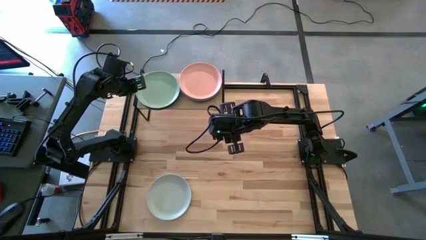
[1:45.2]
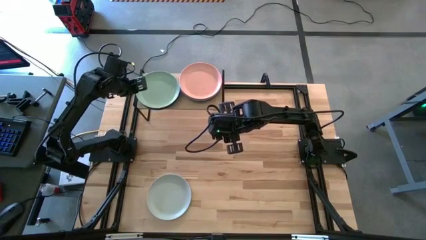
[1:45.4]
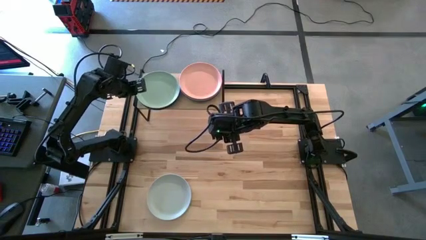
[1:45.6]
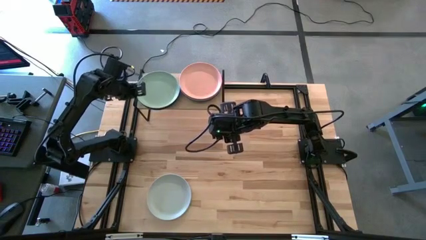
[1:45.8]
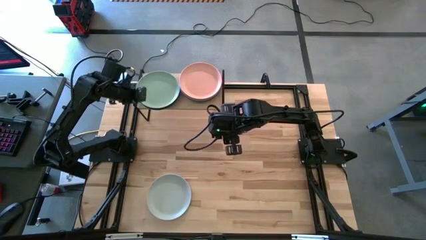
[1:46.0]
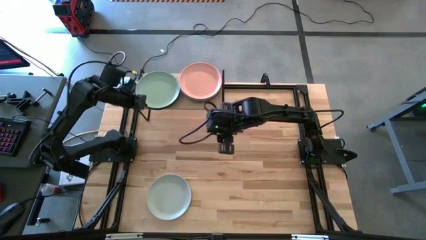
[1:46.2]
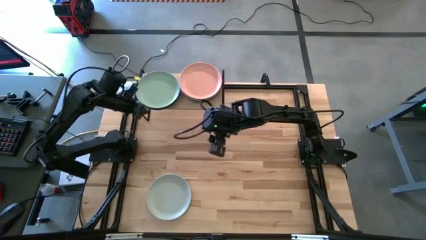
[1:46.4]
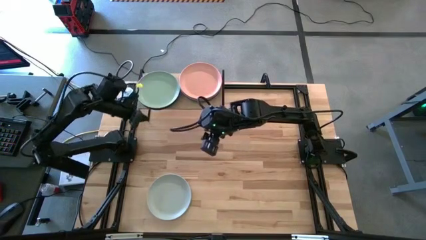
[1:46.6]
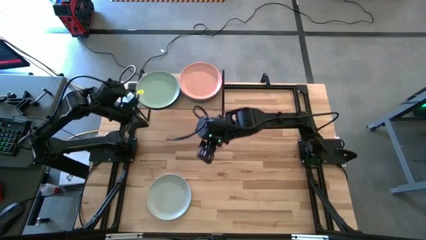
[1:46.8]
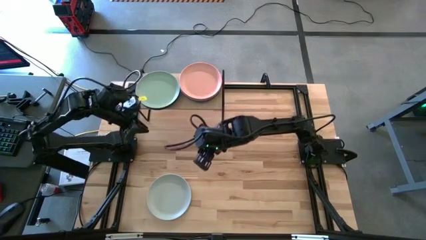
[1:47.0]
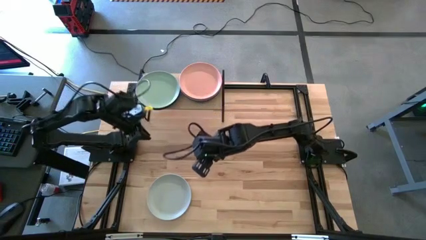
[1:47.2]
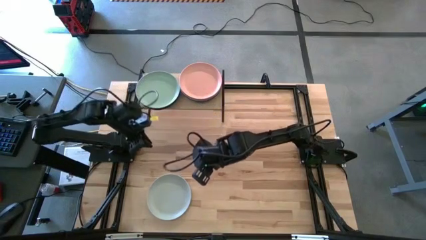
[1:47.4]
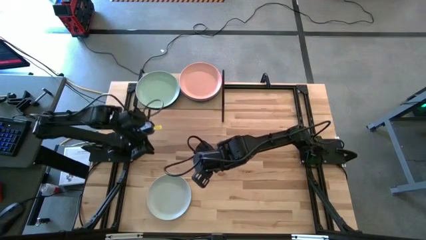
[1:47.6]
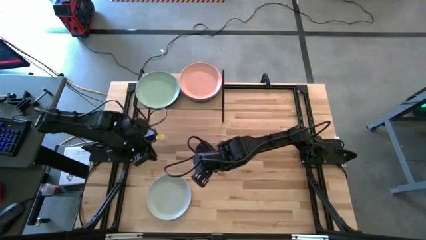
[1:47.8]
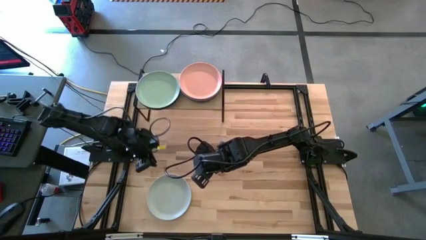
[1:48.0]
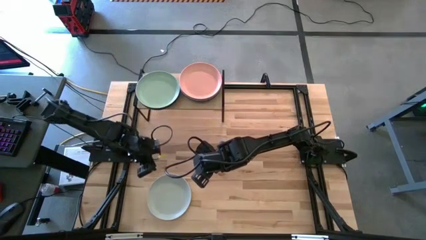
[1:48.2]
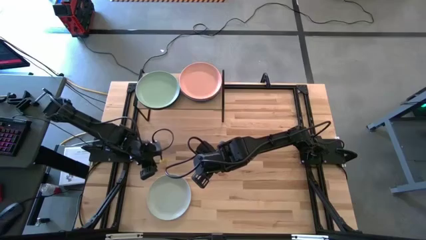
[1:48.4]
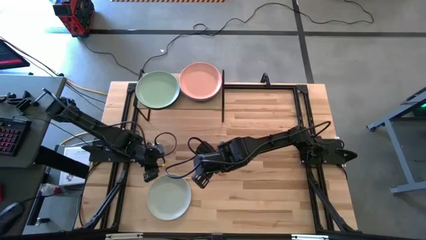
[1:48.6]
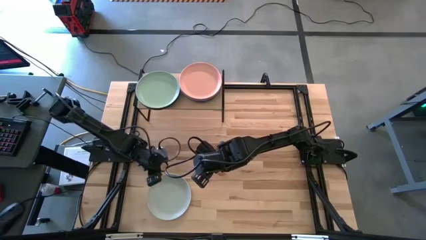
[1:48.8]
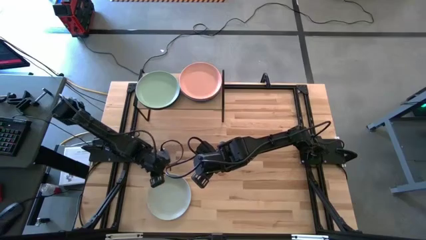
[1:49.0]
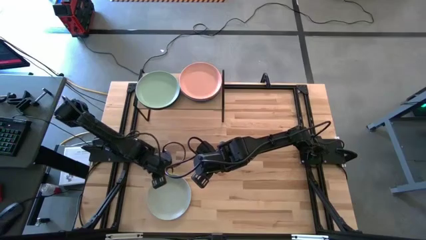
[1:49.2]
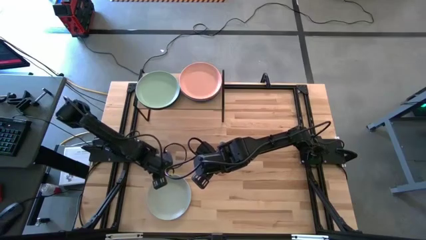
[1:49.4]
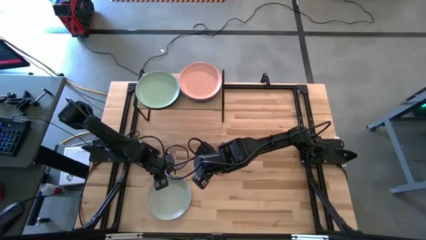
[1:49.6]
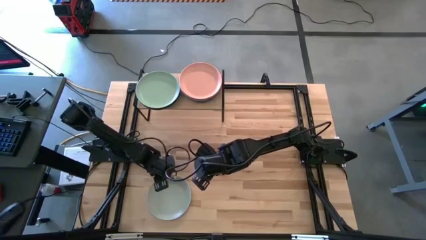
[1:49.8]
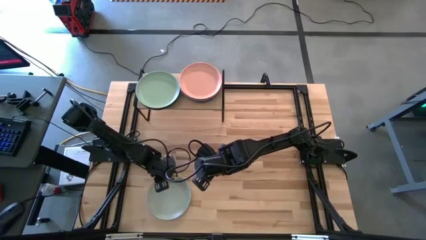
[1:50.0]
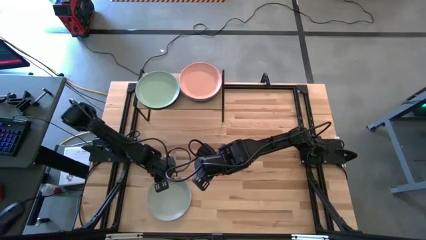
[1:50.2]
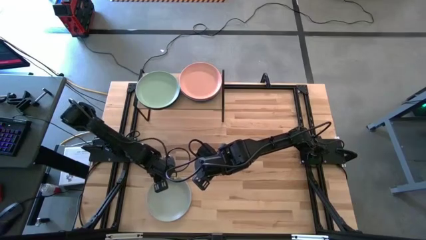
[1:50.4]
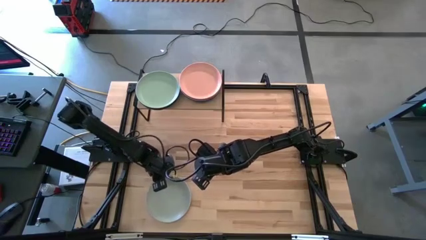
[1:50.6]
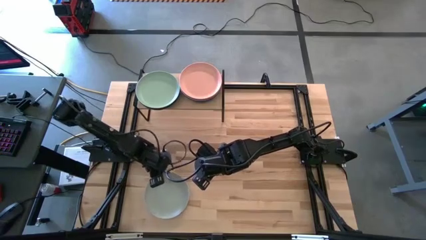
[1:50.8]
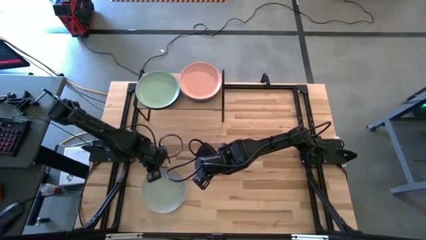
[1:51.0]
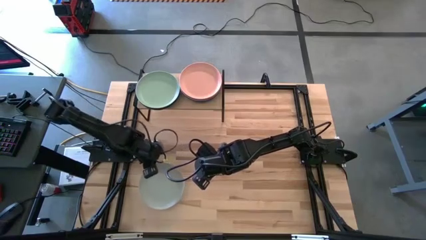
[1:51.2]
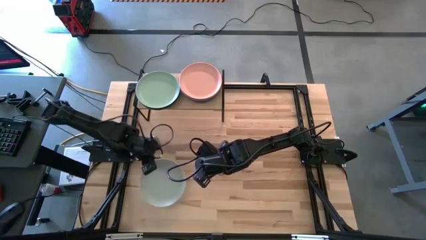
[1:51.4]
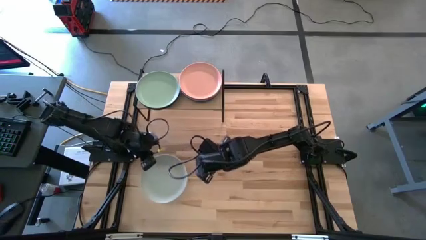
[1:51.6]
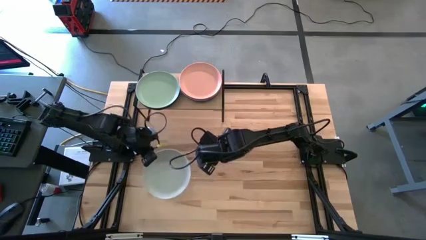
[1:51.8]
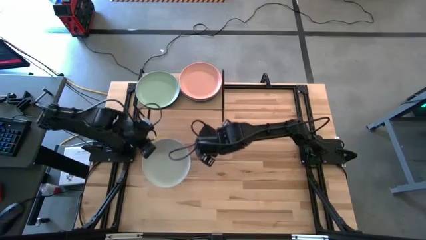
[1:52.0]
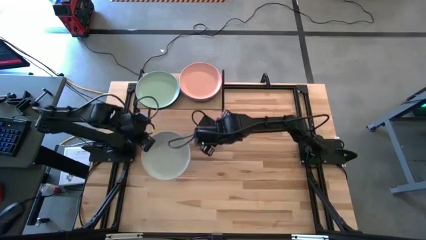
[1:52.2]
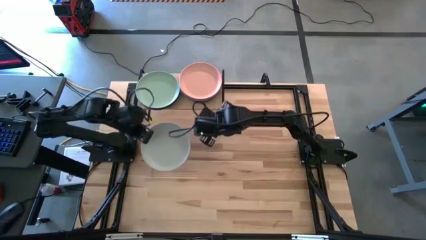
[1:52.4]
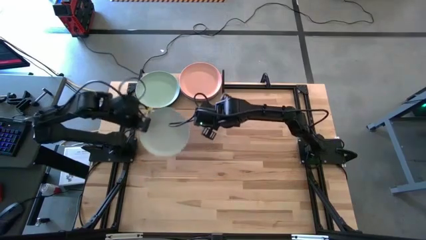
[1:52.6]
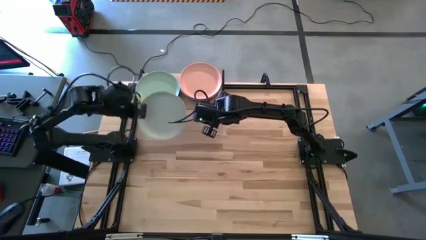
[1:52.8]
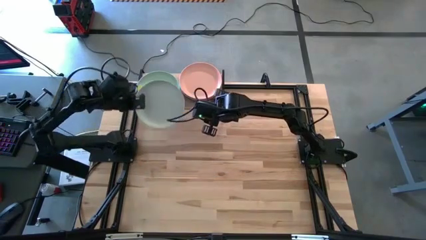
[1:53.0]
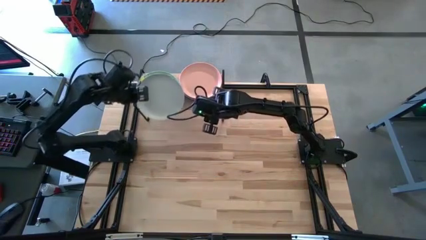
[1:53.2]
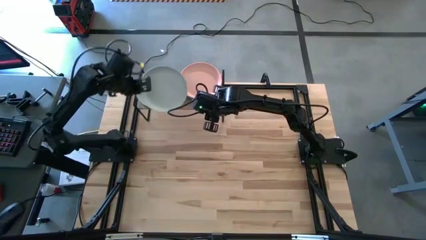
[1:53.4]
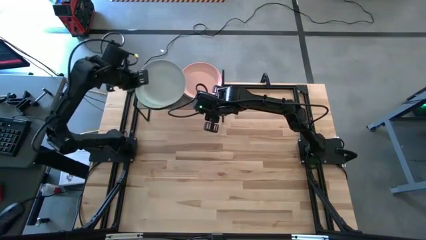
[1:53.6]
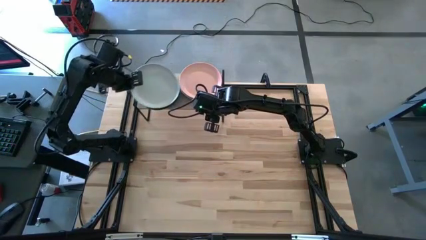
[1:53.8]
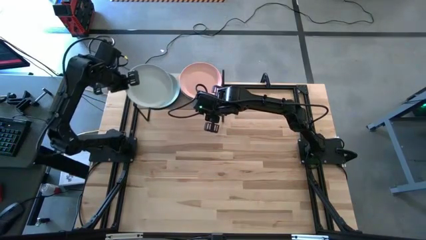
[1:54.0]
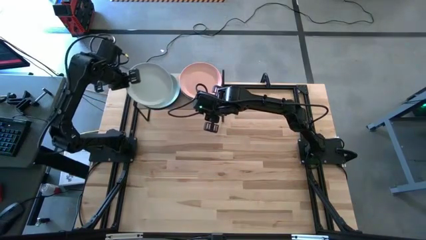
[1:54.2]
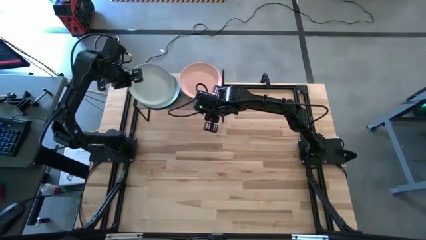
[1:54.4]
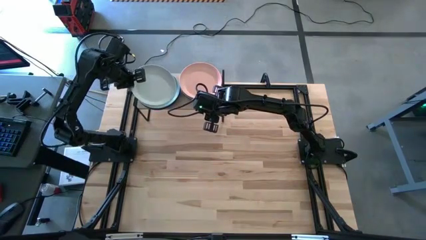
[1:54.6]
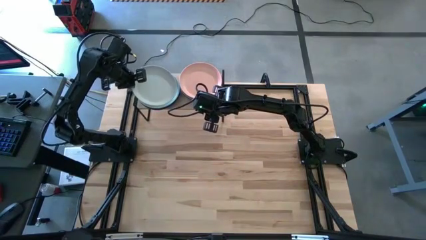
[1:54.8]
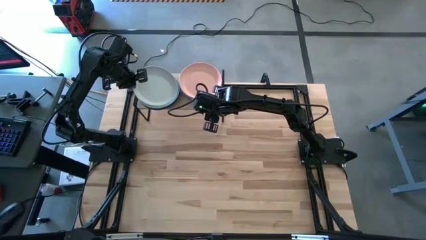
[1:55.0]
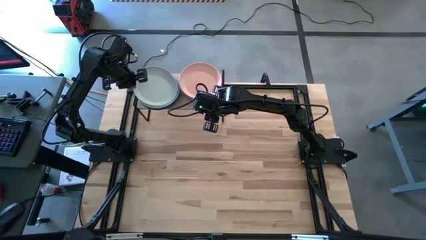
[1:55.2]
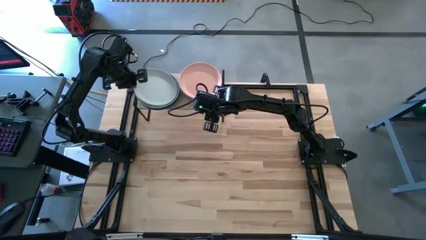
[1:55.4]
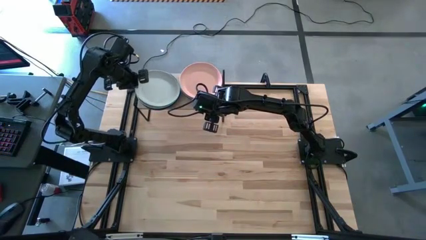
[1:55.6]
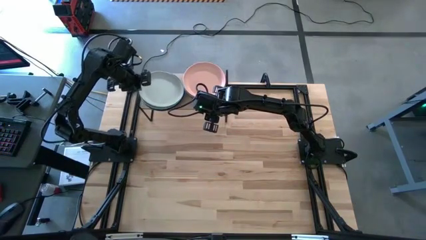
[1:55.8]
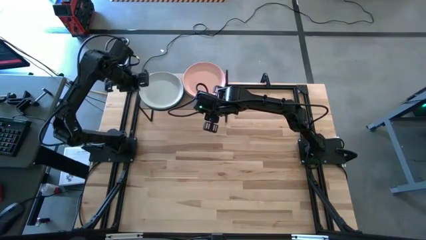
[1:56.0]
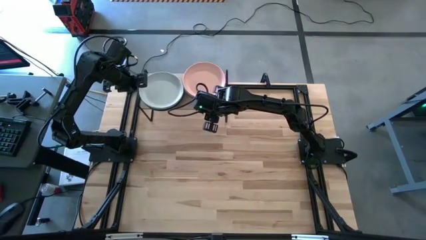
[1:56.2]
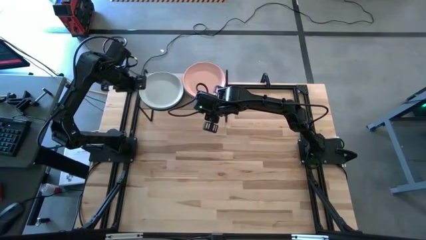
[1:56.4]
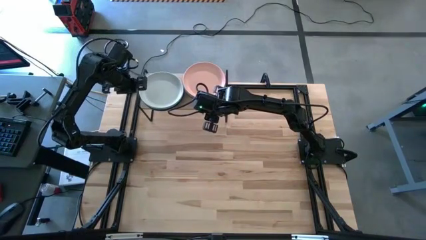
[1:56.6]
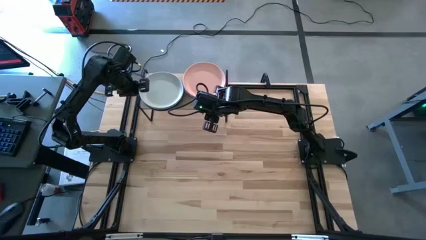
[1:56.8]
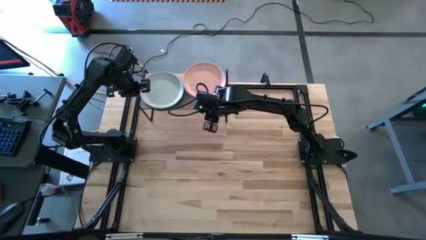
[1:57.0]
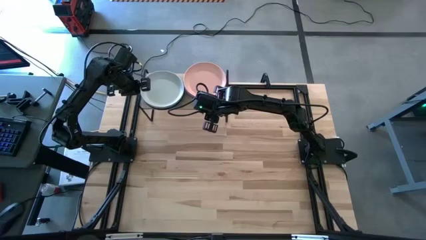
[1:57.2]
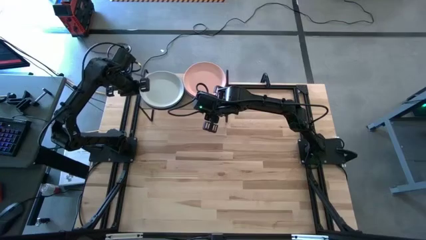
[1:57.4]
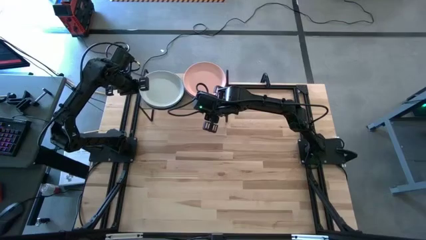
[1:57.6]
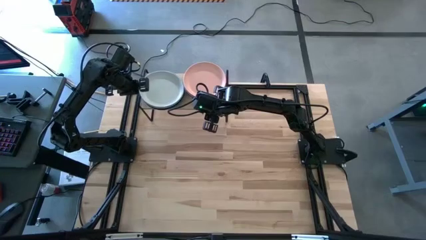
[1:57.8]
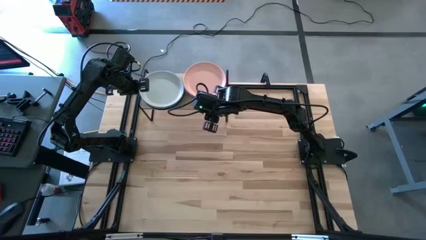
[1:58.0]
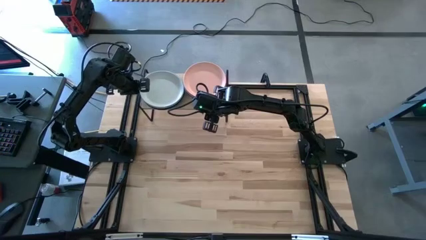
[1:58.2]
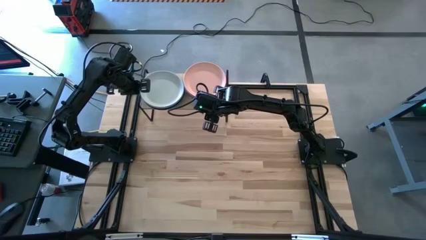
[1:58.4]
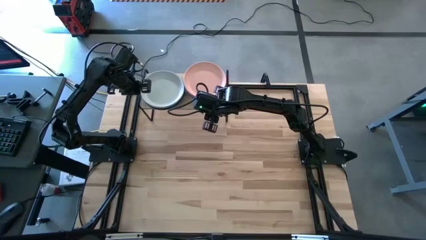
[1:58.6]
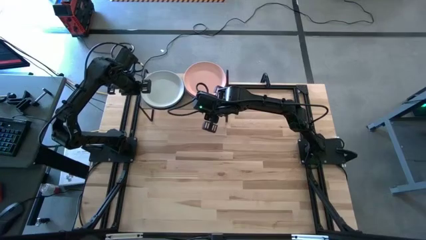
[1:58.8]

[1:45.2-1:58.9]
Task: Place and stack plates onto a shelf
Stack the gray plate on top of the light green plate on the shelf

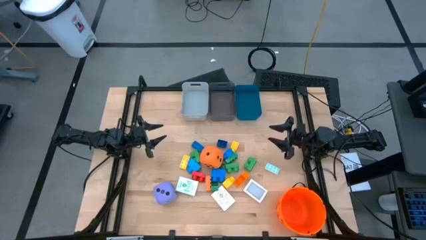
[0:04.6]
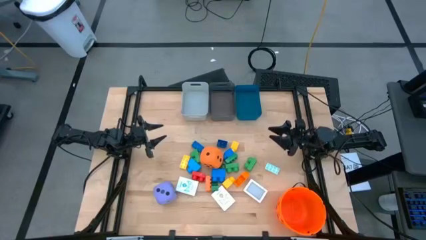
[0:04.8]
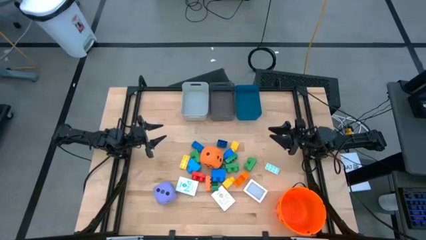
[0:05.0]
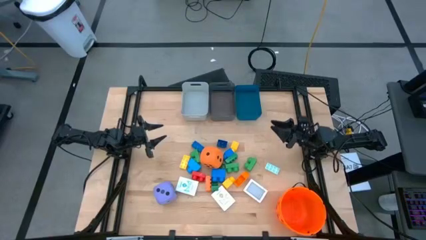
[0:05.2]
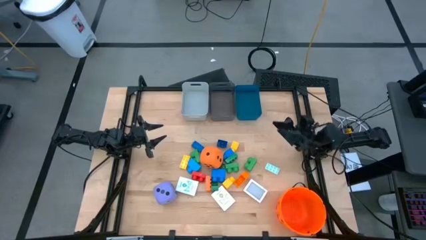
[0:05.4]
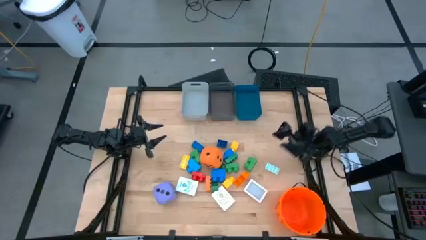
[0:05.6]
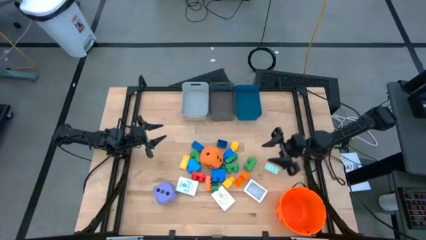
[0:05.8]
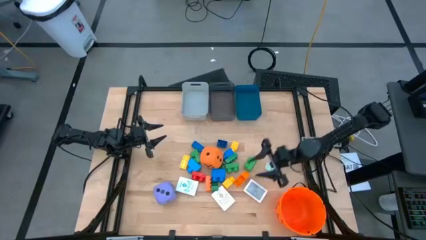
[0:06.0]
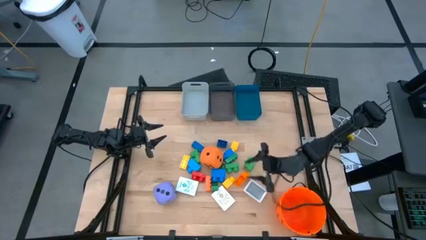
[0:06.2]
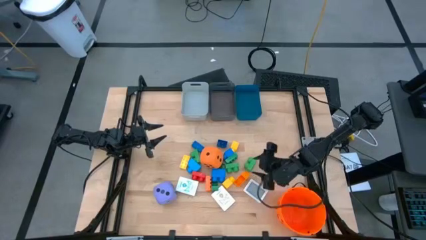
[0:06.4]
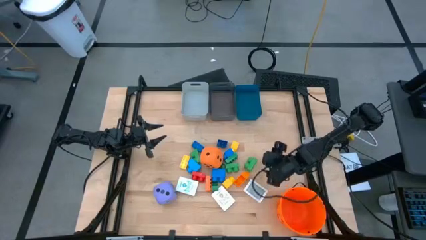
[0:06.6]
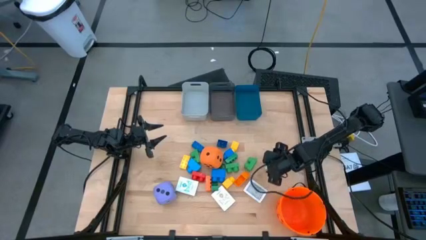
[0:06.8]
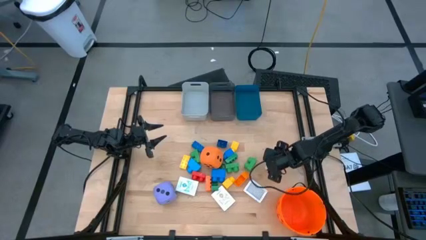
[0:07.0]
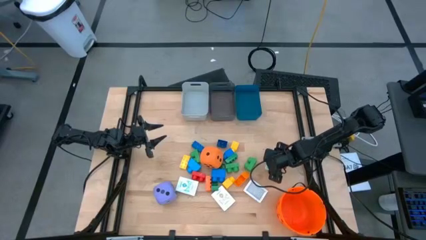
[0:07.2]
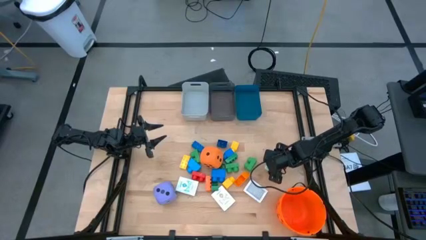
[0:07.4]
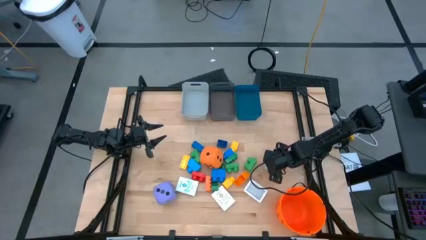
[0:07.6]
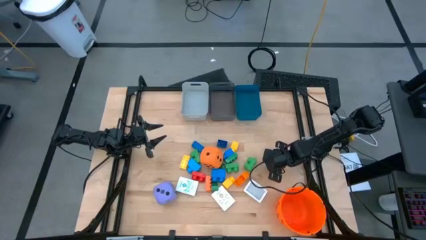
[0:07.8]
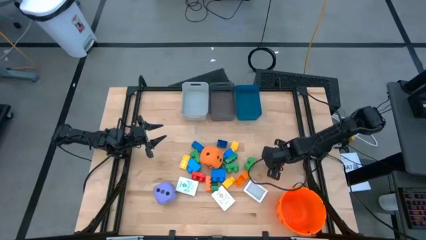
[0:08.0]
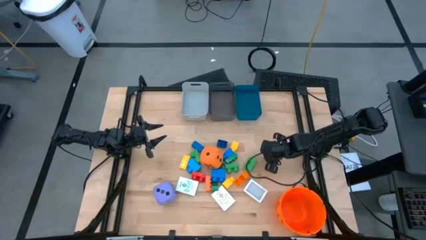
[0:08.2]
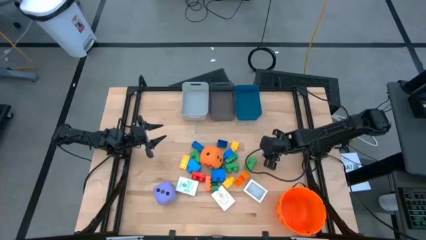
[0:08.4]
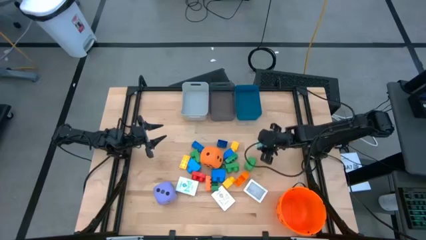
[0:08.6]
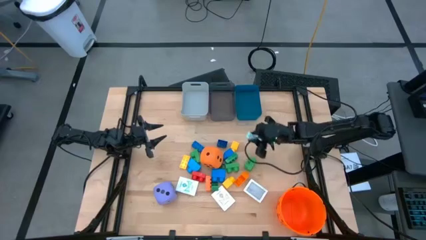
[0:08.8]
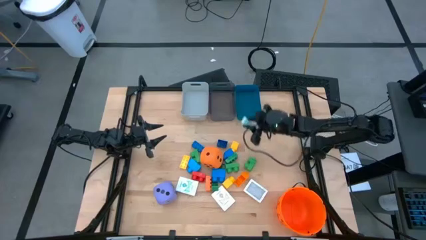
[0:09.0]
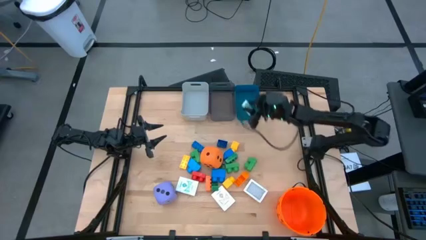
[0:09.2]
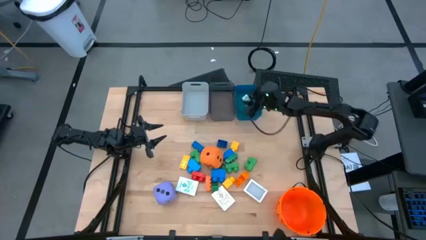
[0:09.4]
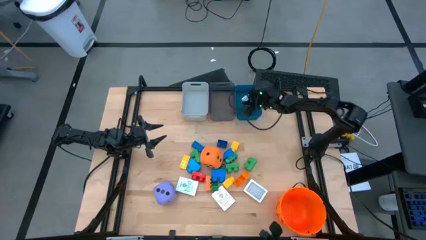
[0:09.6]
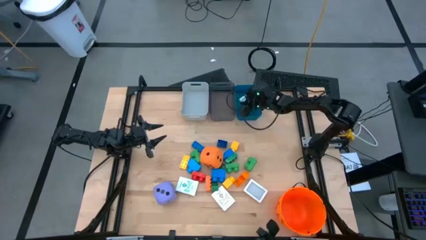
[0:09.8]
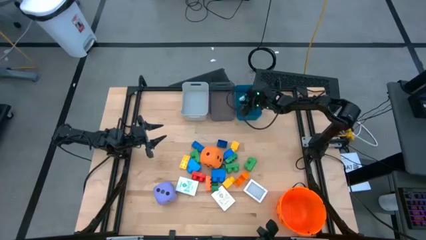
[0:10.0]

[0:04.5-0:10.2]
Task: Pick & Place Toys
Put the light blue game piece into the blue bin
